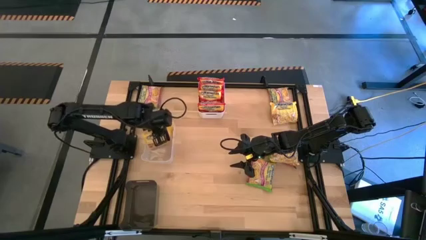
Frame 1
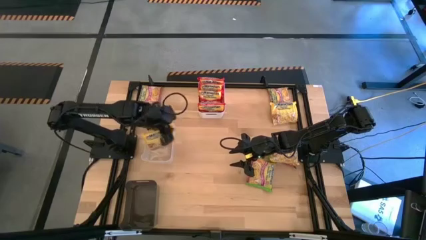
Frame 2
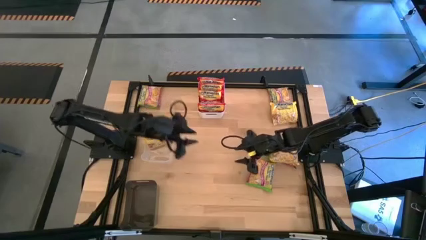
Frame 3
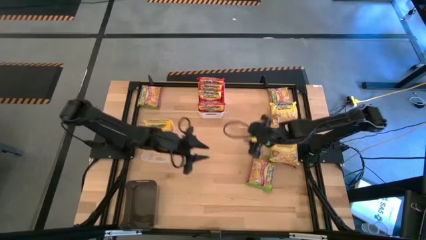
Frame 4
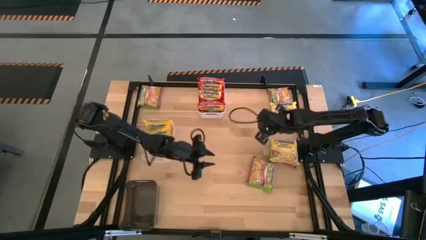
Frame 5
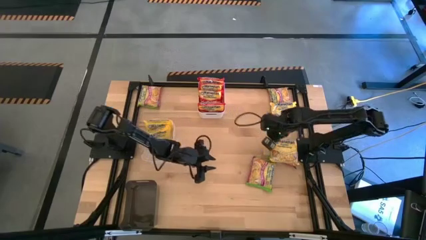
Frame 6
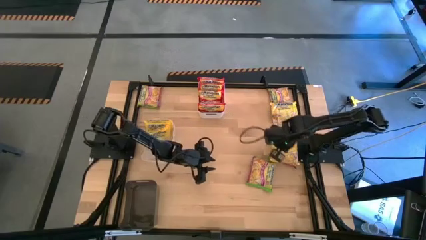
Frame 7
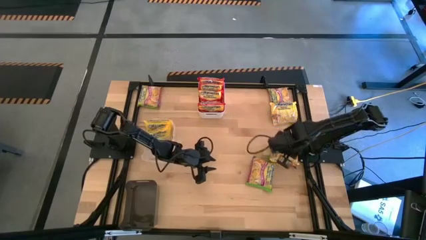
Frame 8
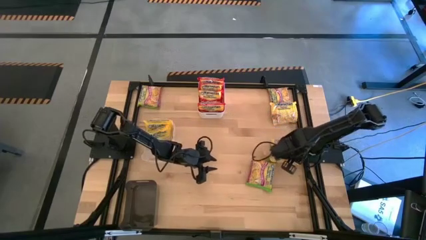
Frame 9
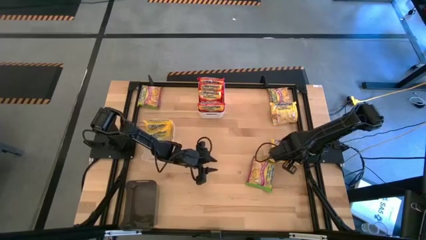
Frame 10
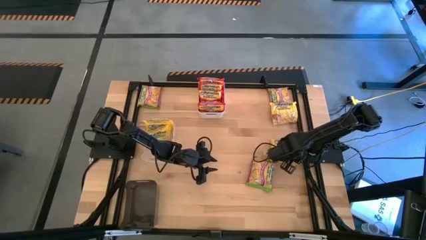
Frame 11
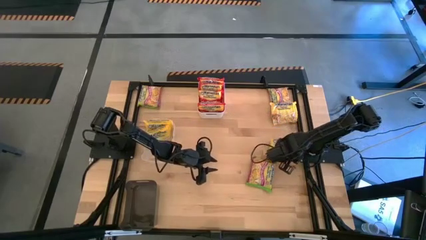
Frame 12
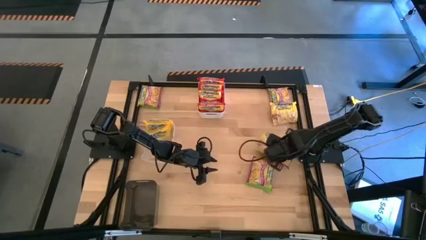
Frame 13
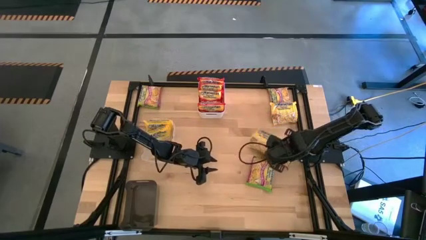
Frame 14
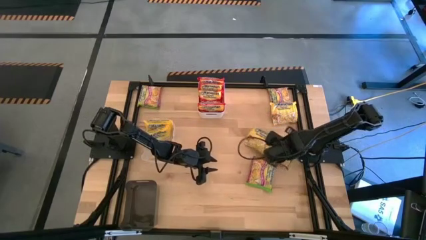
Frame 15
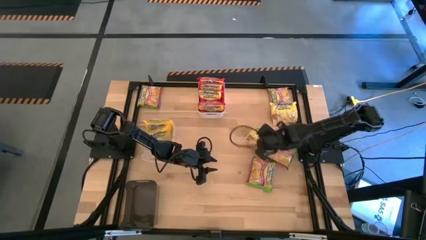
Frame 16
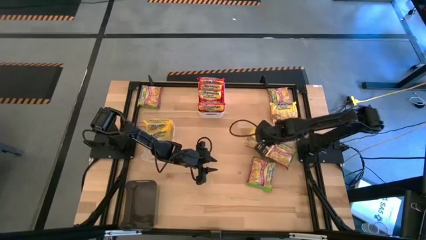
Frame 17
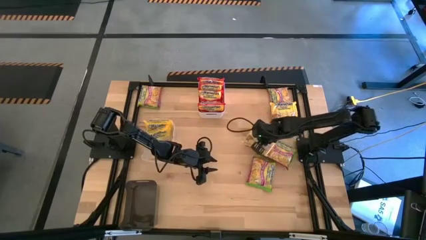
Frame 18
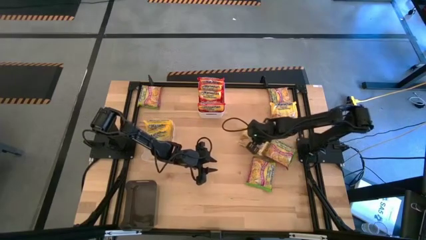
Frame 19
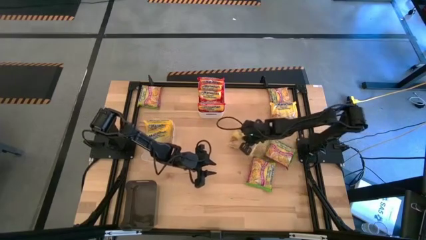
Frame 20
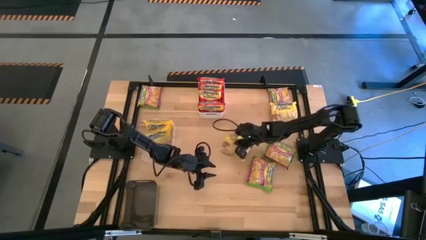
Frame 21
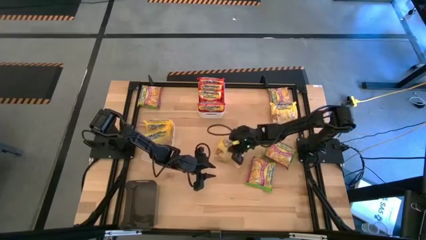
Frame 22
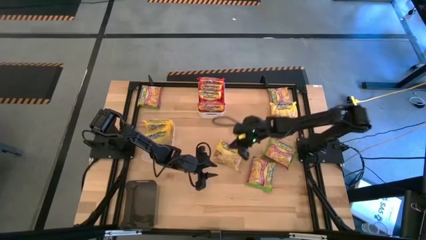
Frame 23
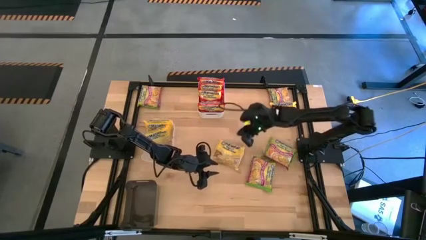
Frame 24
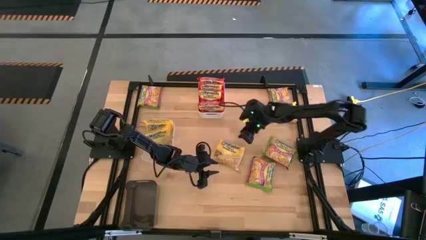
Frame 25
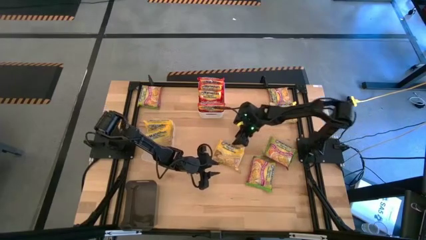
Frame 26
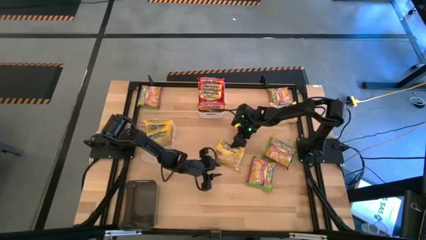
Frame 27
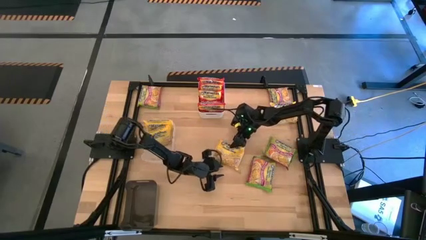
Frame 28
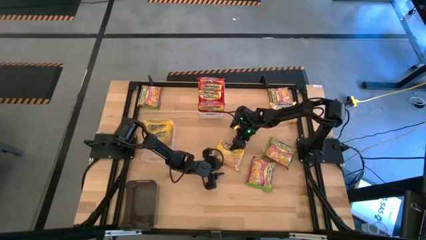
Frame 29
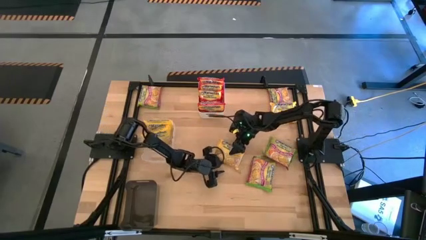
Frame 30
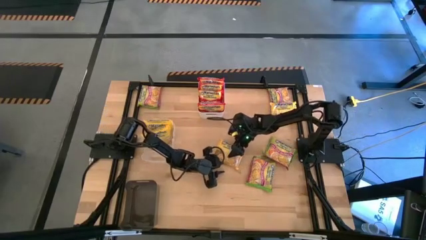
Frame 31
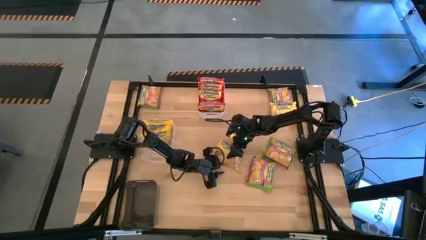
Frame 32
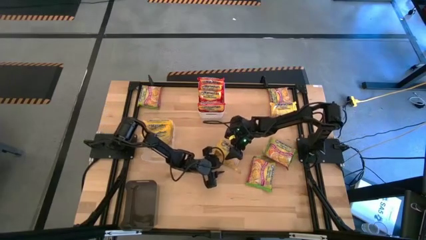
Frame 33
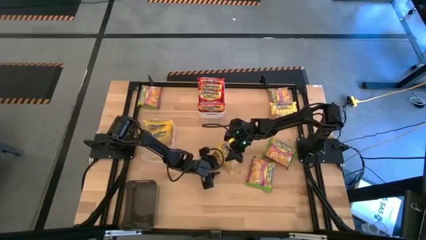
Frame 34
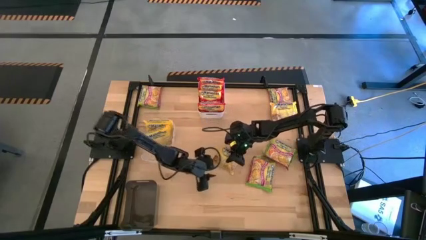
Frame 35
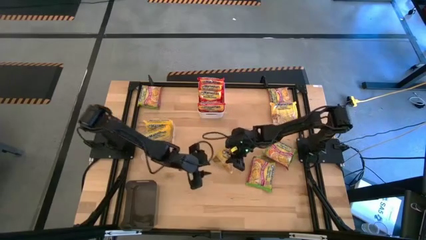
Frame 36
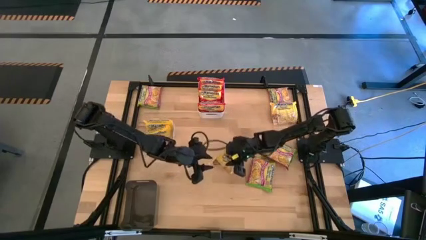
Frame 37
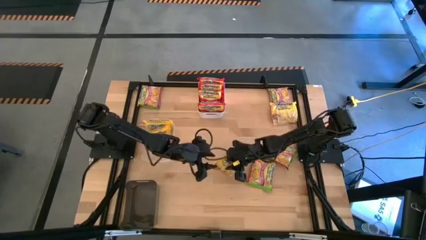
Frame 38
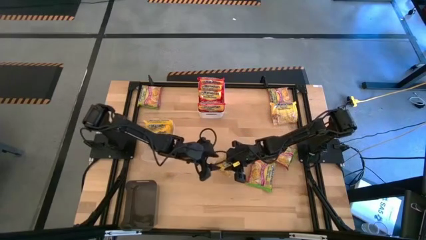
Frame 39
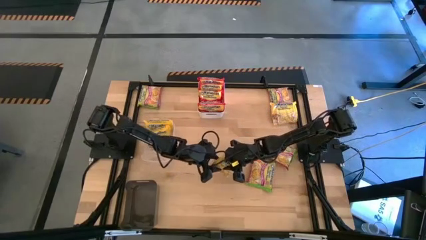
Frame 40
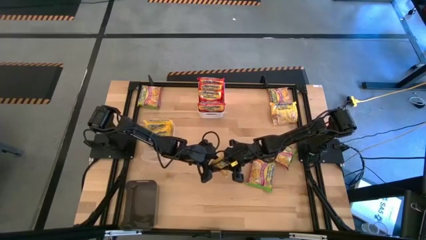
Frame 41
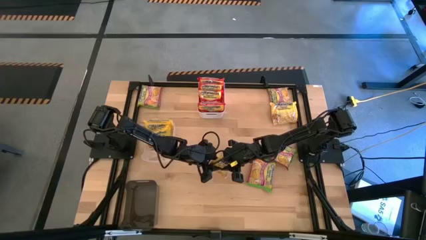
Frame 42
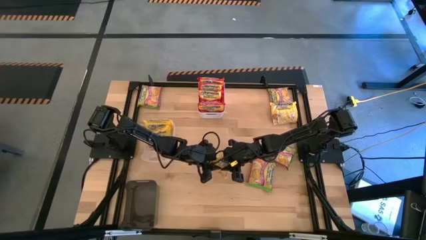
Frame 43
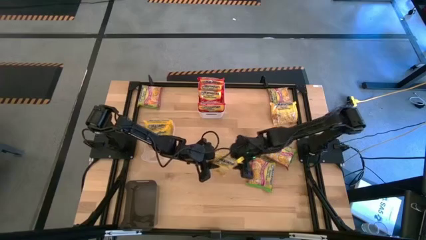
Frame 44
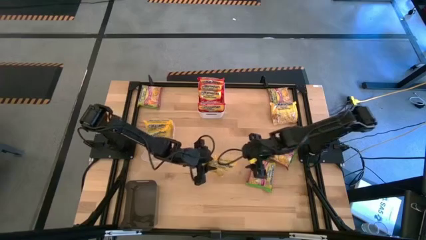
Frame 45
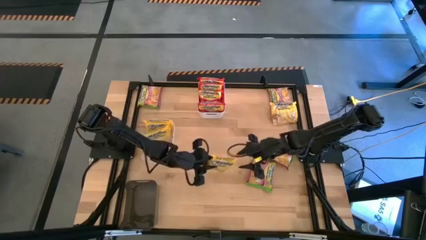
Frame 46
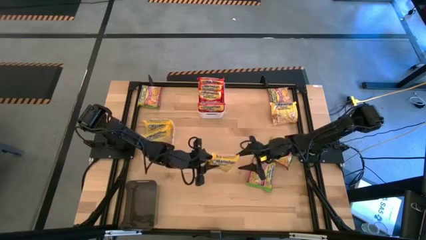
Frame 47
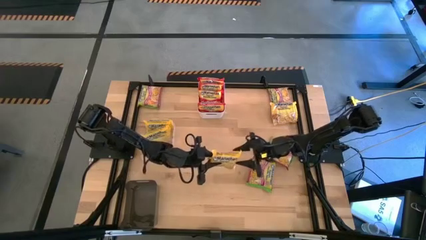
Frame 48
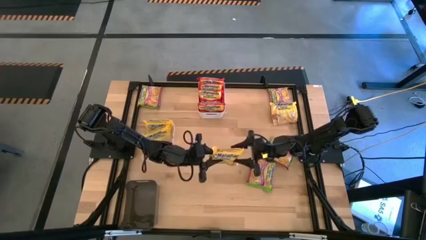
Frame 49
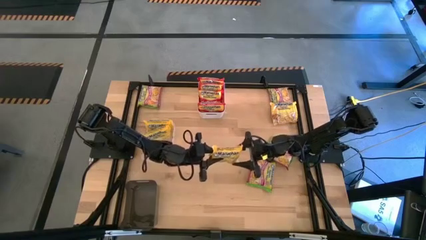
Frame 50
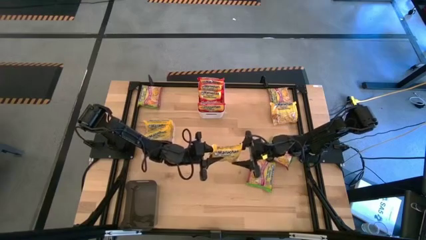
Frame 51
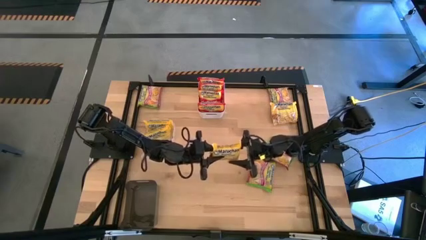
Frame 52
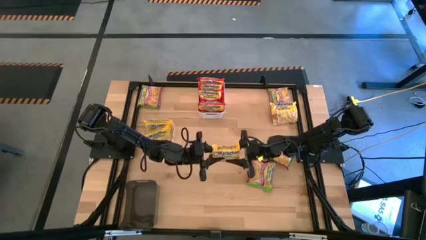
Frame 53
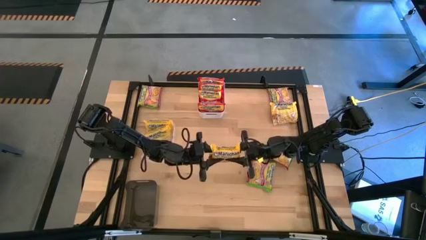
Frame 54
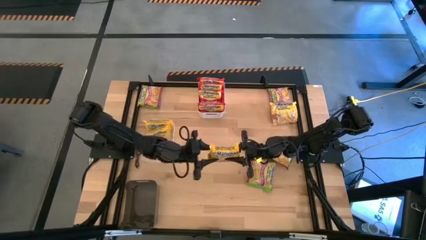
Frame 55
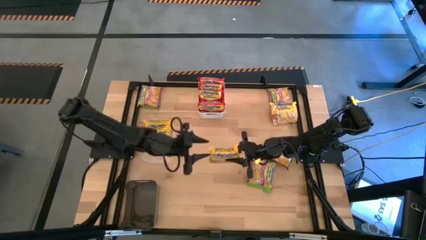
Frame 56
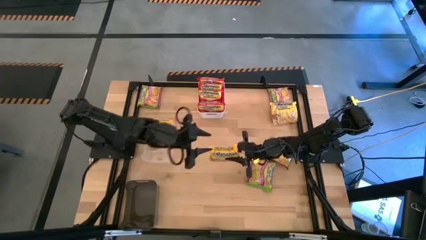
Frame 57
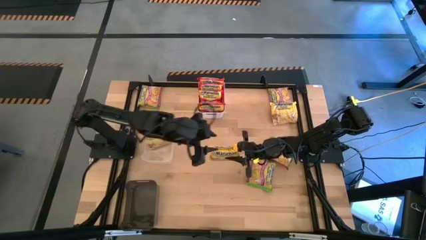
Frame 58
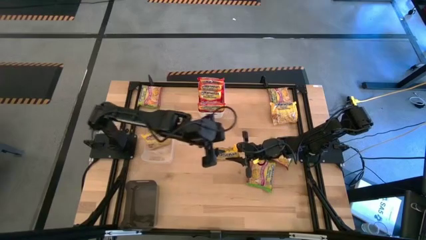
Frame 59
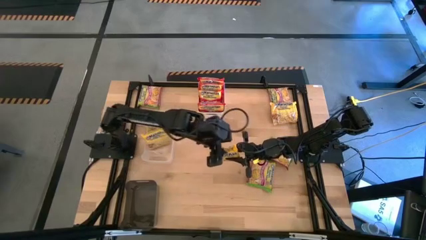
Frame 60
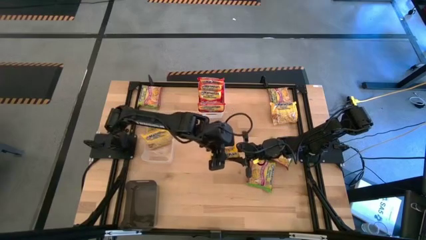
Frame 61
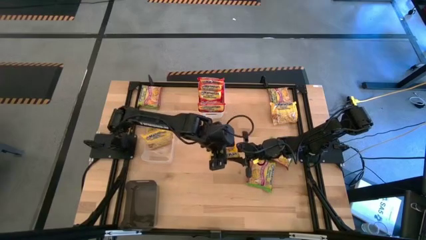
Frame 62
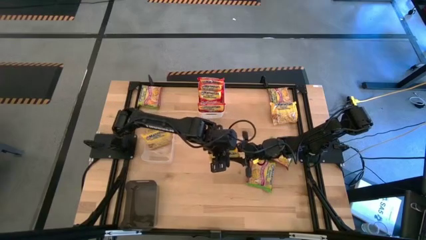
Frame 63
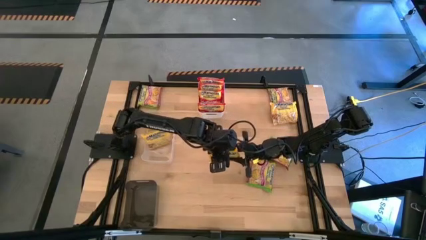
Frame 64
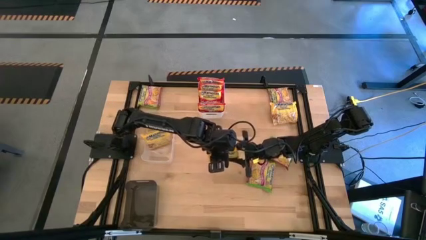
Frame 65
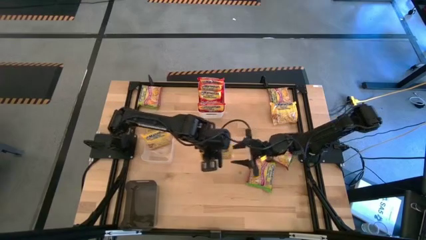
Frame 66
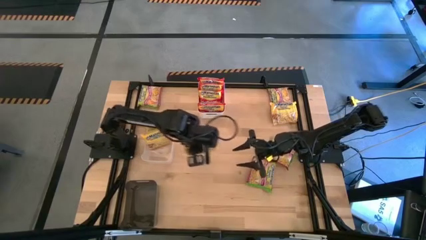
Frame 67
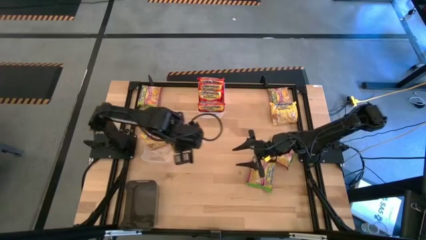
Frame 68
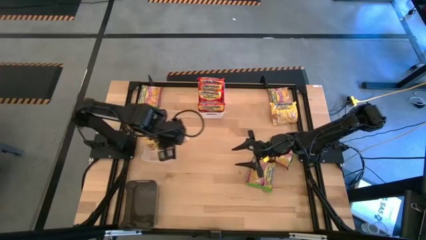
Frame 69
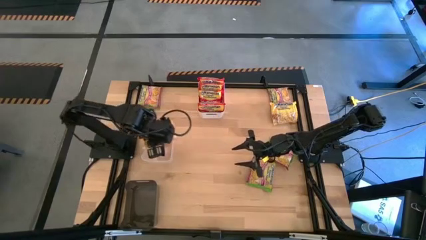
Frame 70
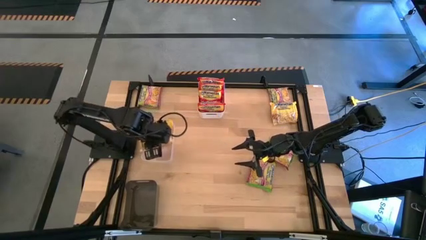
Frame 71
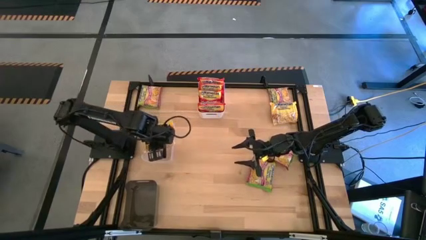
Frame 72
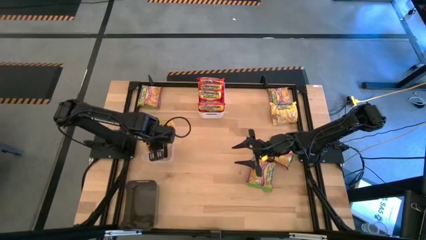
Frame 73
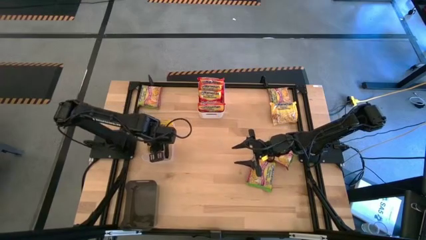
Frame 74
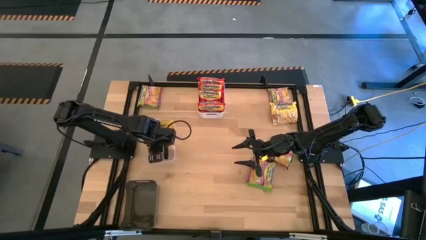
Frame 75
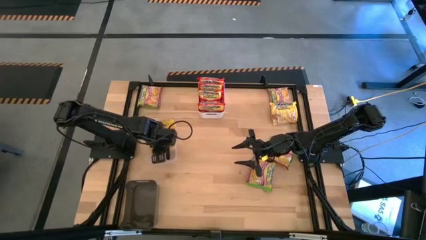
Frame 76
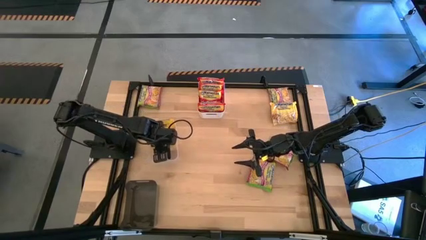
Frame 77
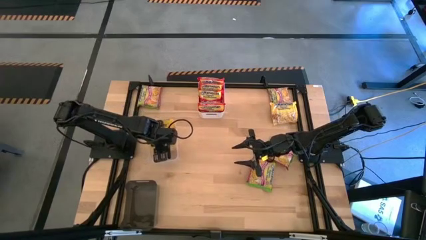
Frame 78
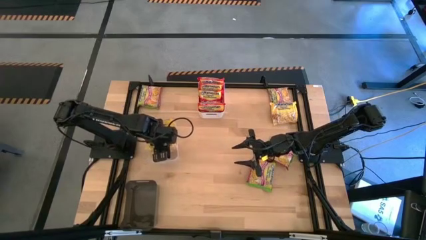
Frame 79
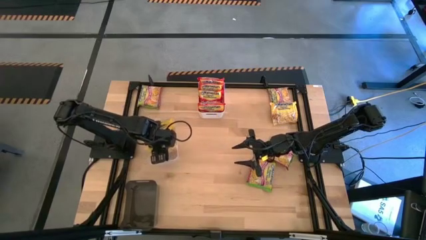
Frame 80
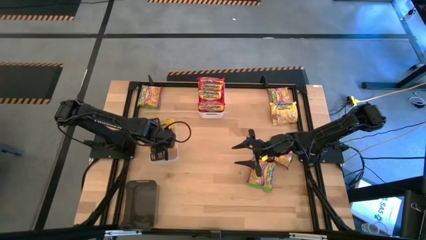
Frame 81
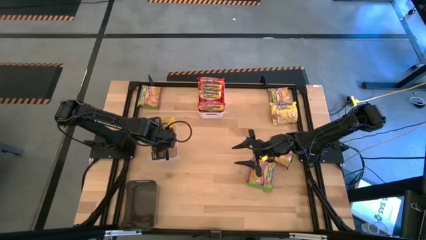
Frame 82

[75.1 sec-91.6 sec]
Task: Sort Maruchan noodles
Put the yellow noodle pack into the transparent bin

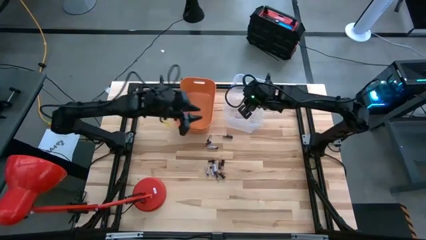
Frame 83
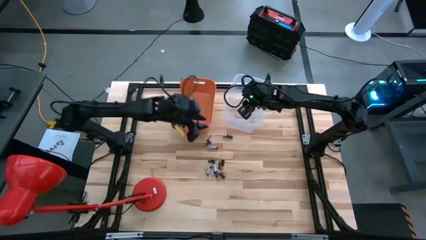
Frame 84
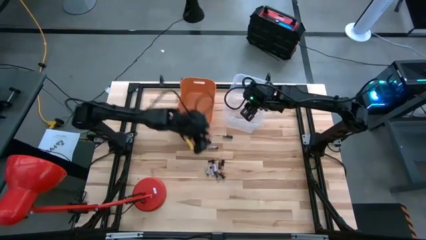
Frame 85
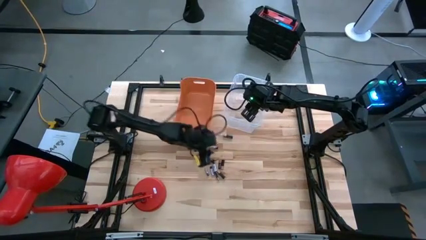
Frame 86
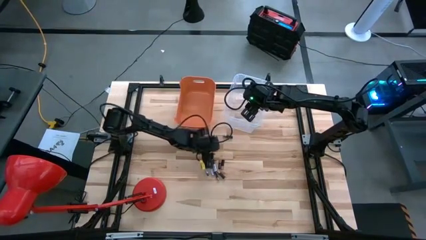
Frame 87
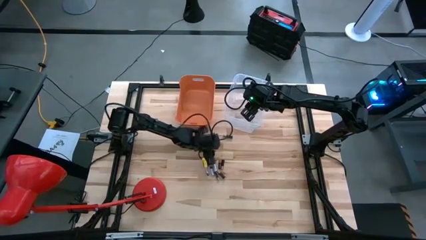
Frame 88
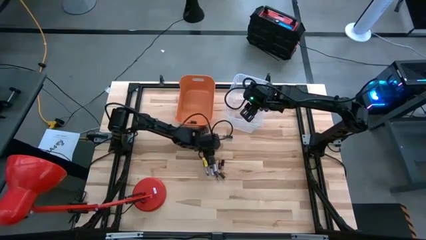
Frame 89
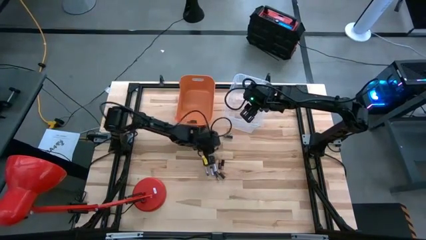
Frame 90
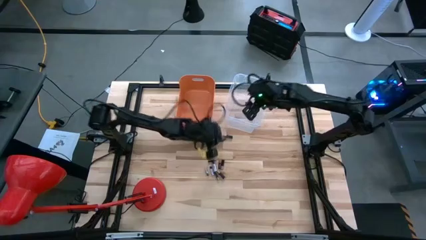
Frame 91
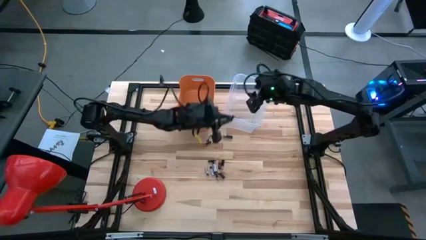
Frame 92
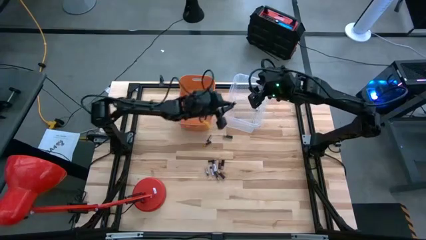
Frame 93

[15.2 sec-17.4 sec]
Task: Sort batteries
Put the silver battery into the transparent bin
